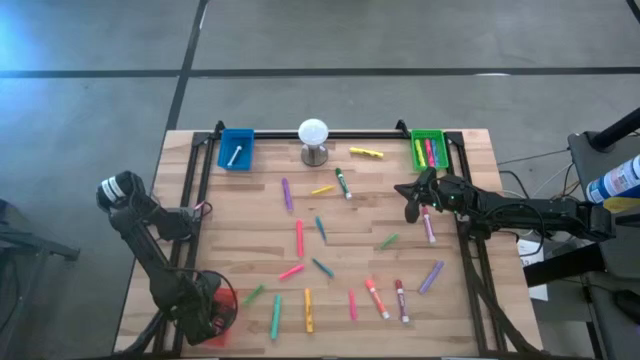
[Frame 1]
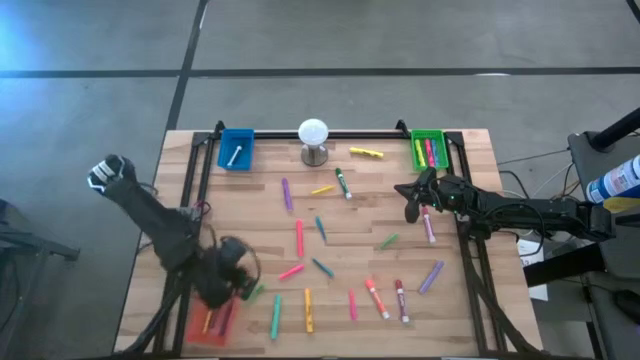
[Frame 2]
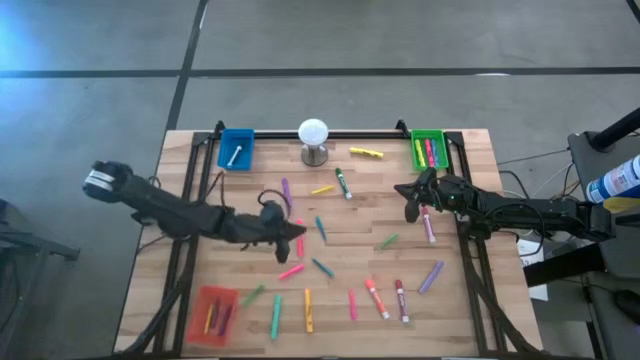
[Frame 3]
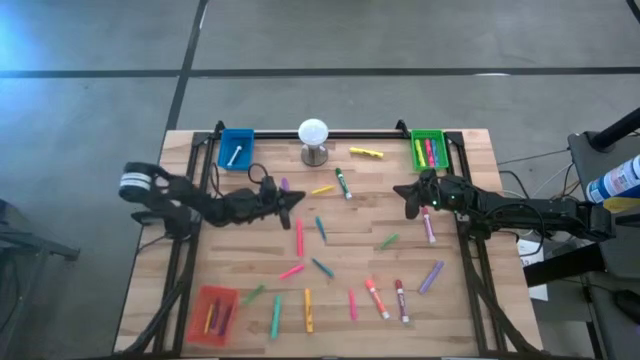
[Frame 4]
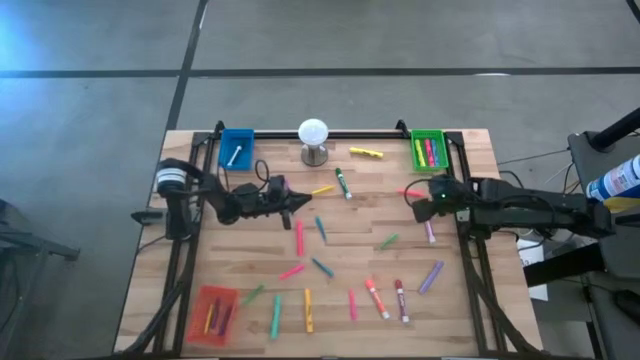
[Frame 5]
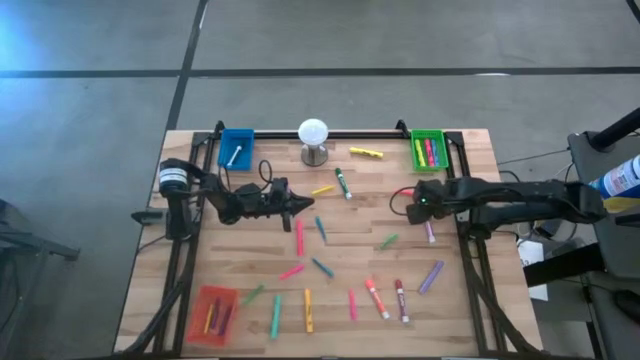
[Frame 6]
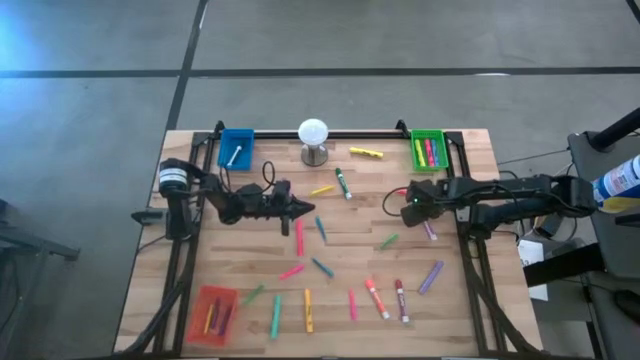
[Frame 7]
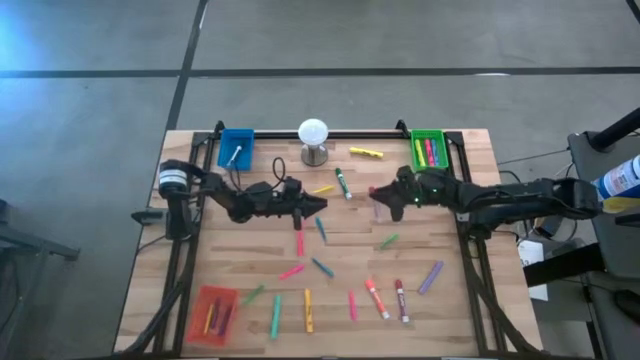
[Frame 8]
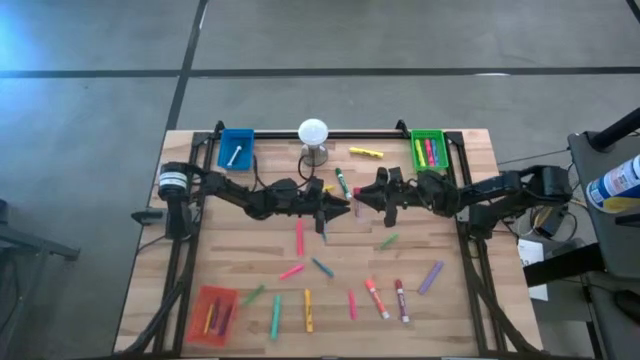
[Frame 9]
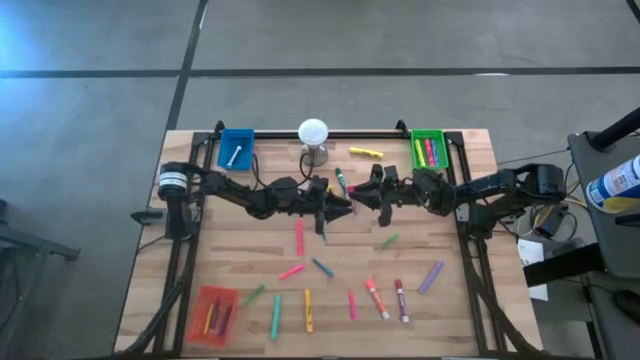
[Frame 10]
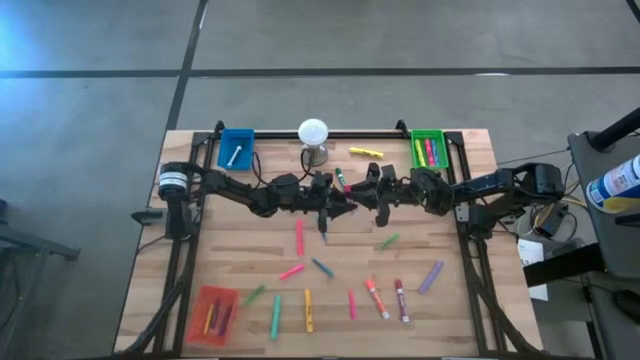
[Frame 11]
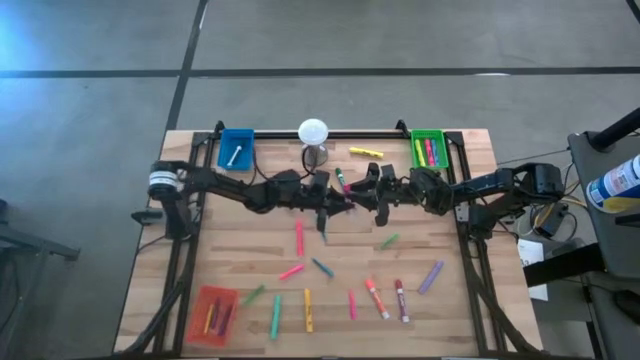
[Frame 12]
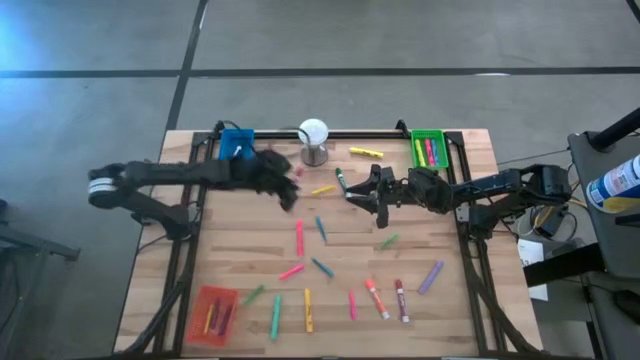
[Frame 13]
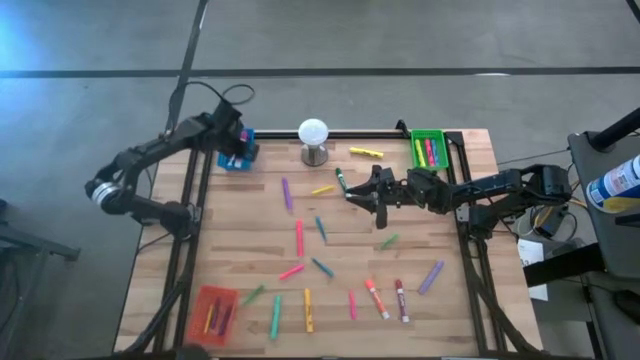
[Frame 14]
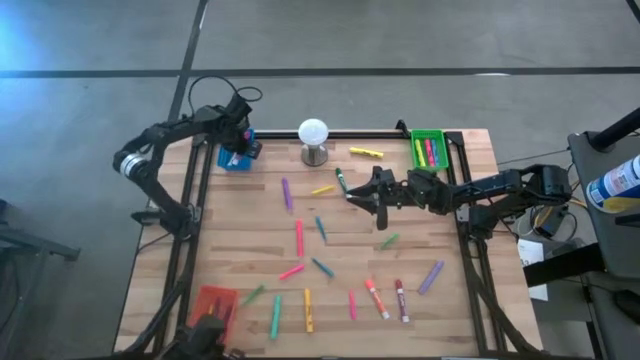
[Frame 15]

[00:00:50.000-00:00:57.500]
Task: Pick & Place Markers
Put the pink marker pen into the blue bin

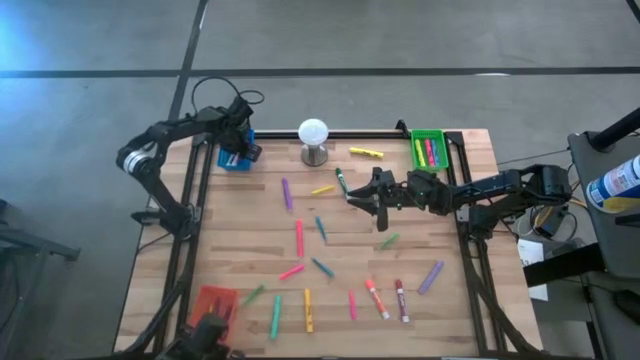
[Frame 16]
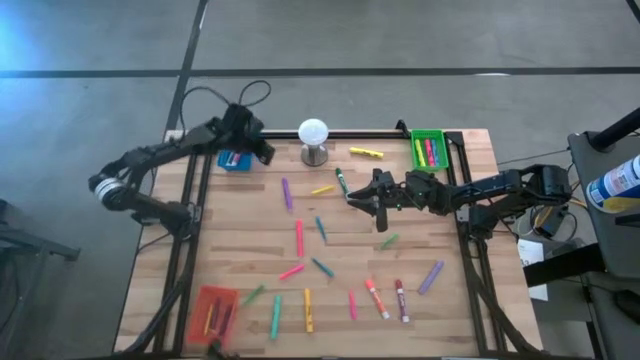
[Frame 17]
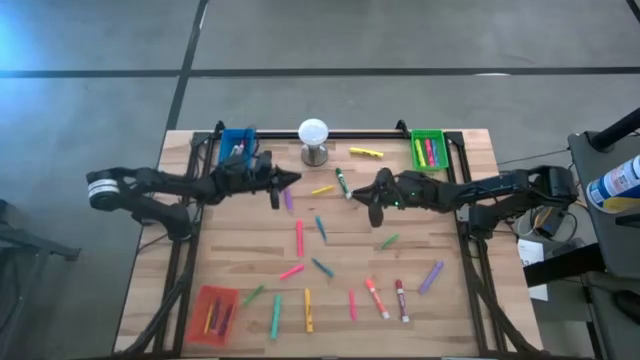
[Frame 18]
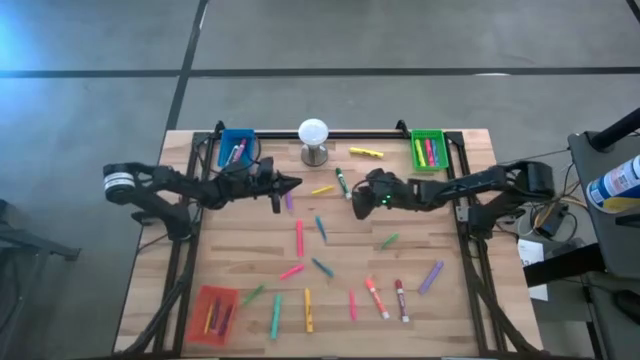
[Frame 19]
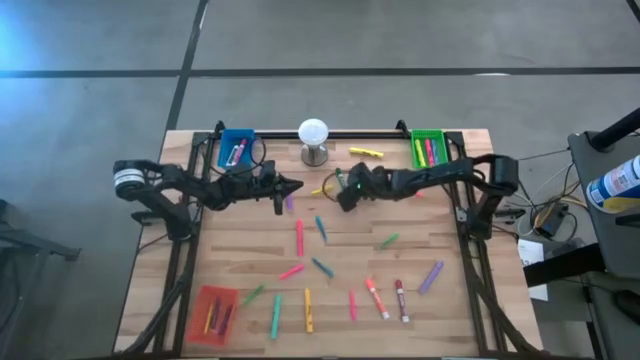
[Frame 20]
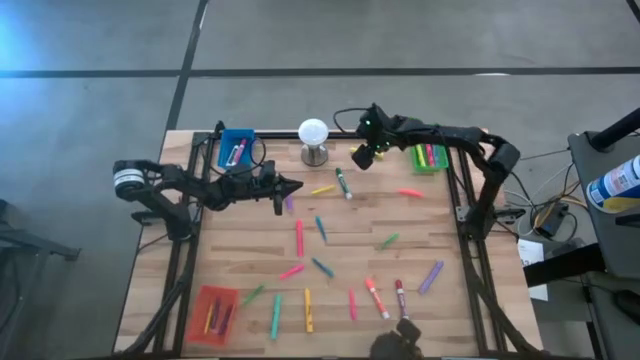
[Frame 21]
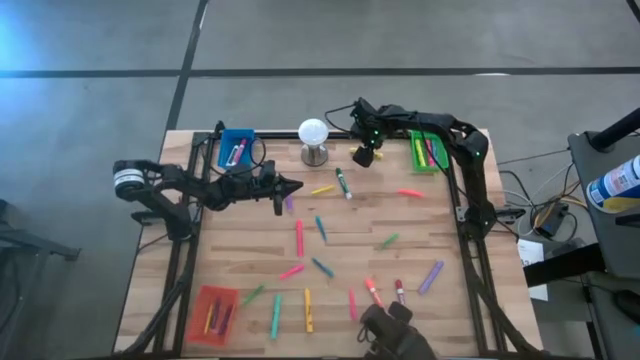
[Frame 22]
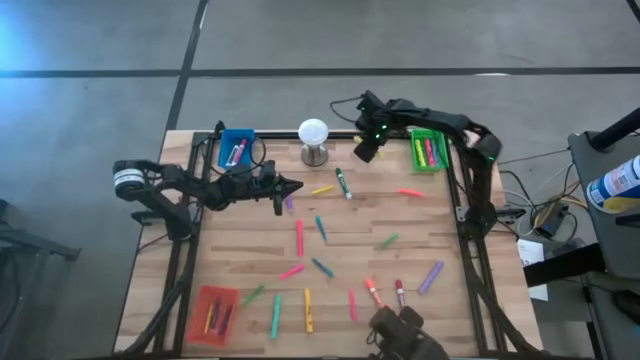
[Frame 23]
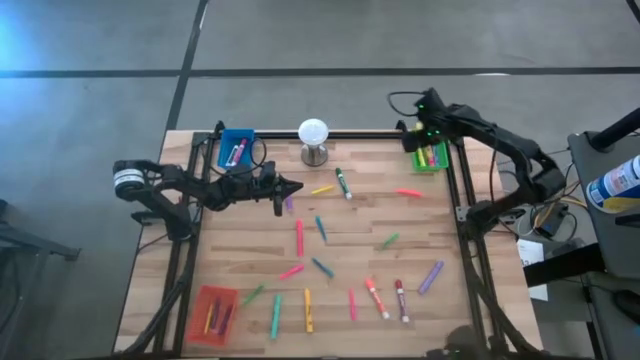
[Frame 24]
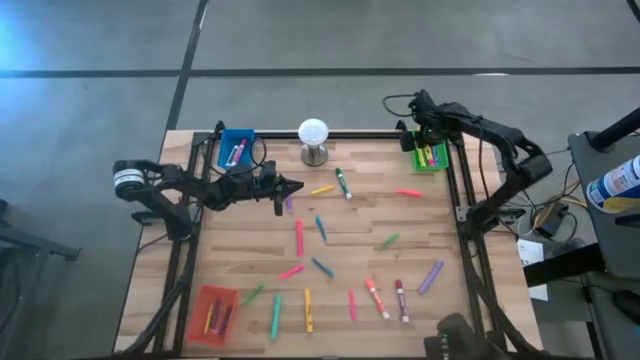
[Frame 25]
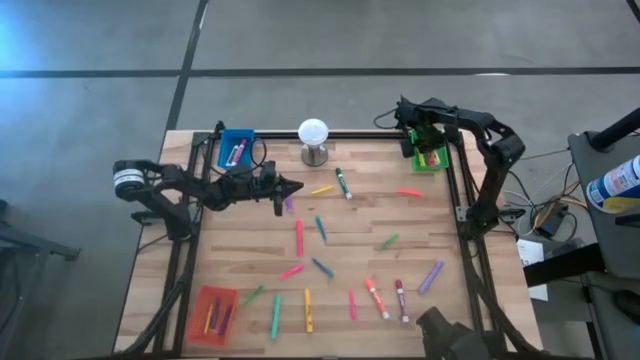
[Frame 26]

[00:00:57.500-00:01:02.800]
Put the yellow highlighter pen into the green bin

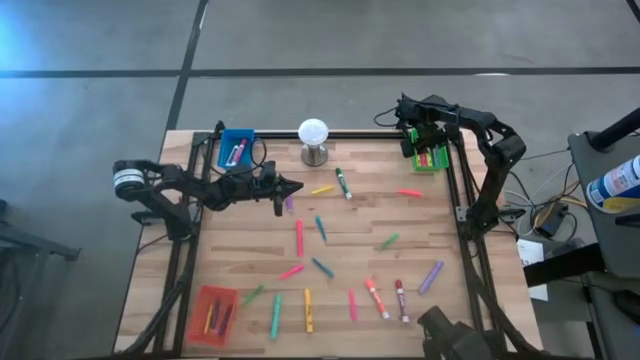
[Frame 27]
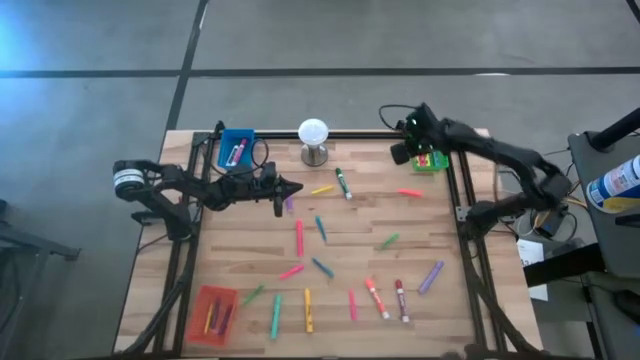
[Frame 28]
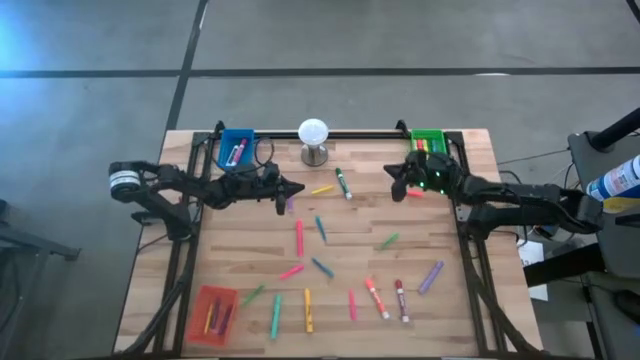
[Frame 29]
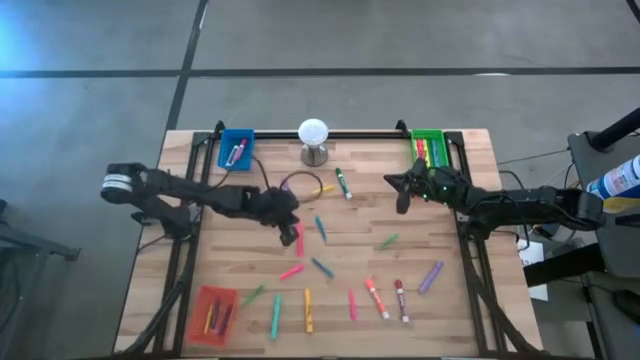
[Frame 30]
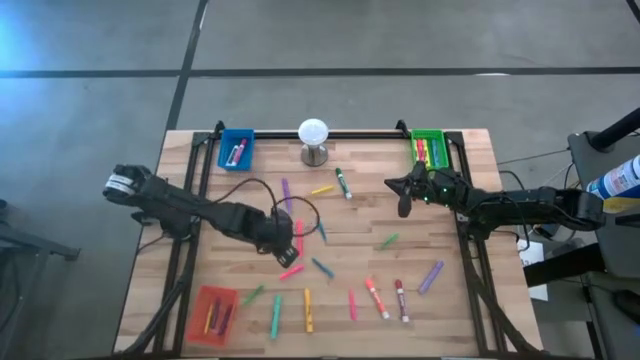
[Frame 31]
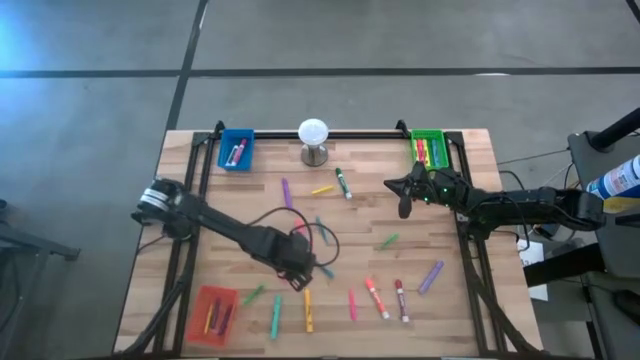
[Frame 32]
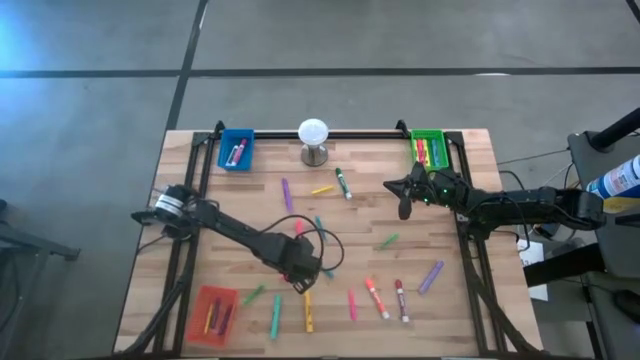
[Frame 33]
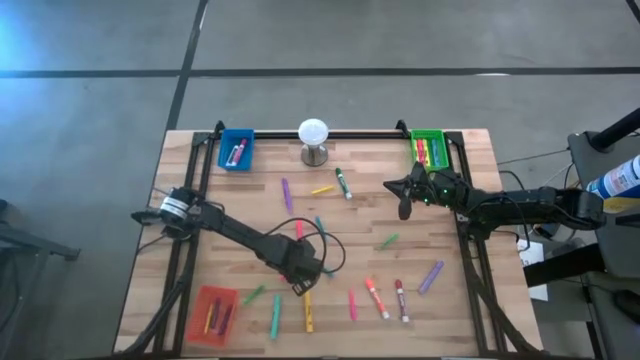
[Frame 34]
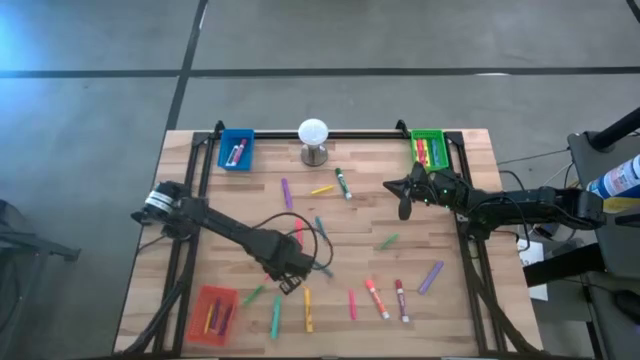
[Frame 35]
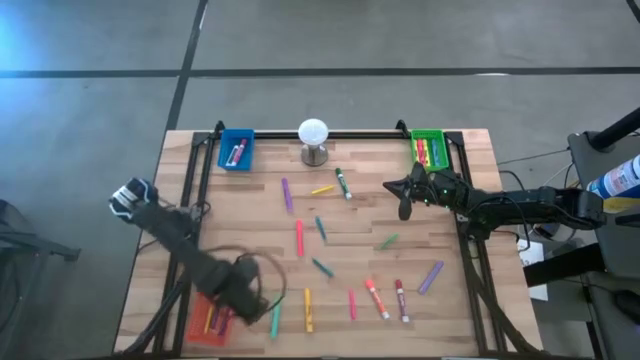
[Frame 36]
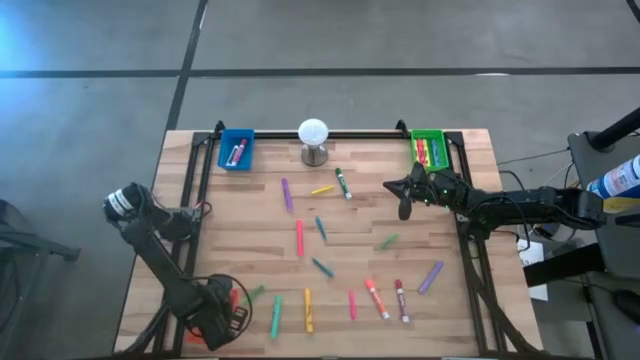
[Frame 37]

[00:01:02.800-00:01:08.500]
Put the top pink pen into the orange bin

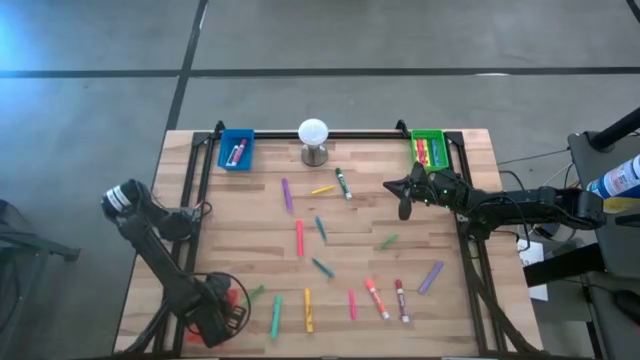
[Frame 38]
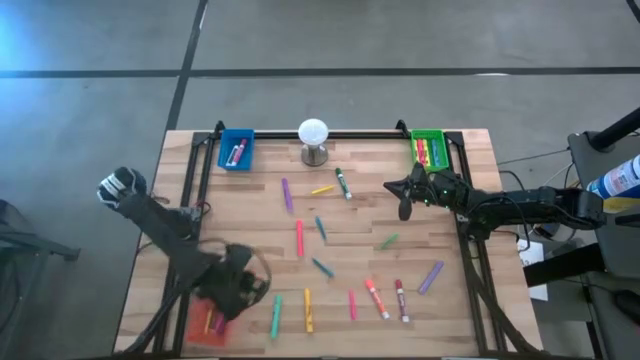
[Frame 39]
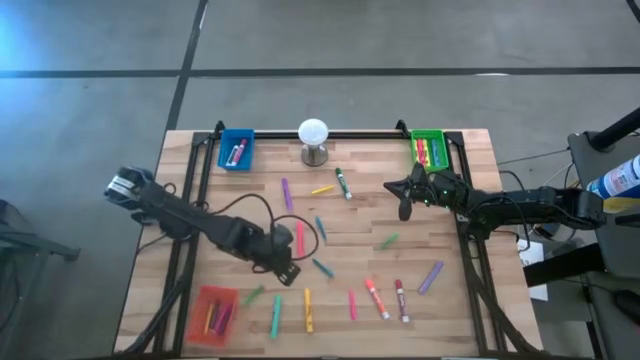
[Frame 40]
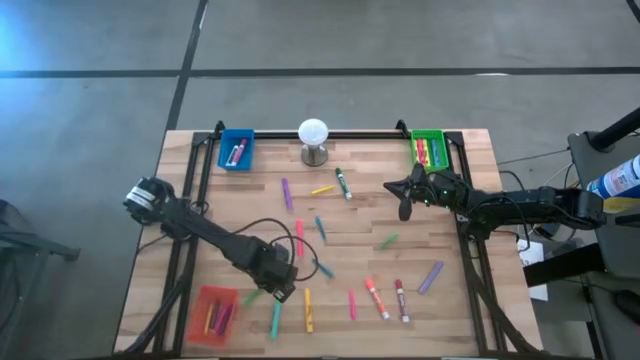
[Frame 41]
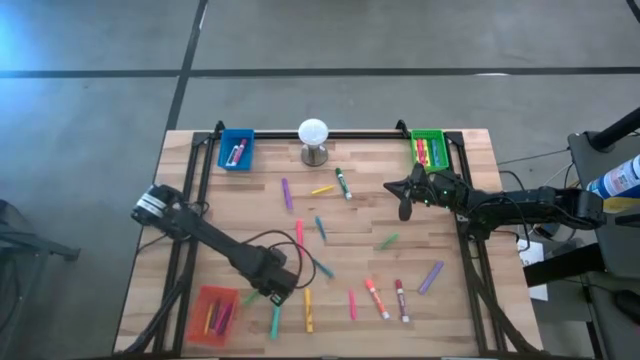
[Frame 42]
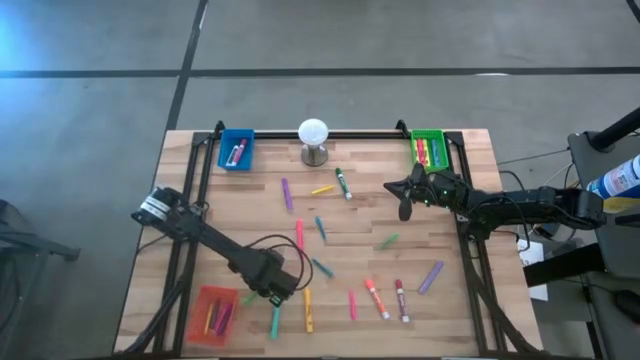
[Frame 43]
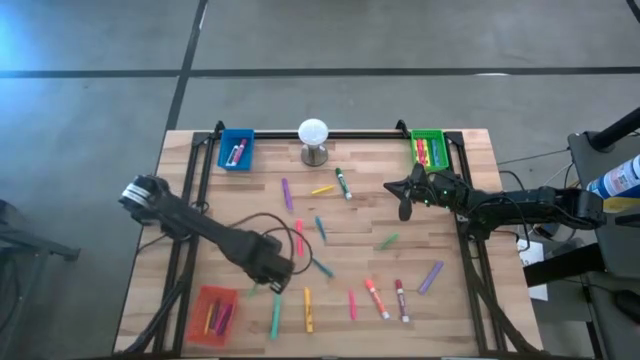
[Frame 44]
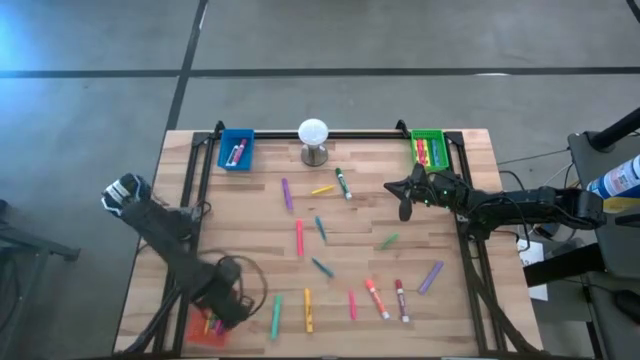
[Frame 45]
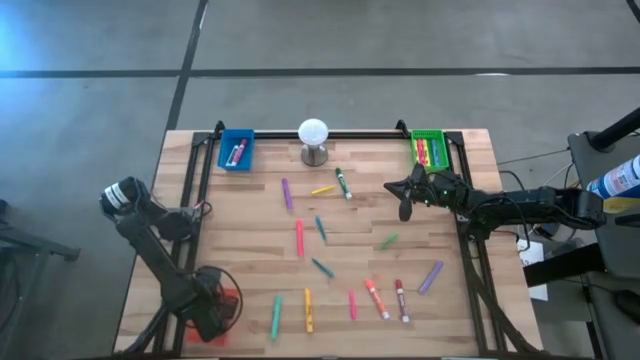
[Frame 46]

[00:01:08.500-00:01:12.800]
Put the left green pen into the orange bin
